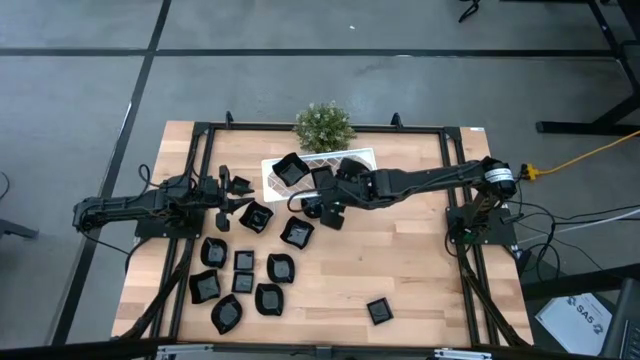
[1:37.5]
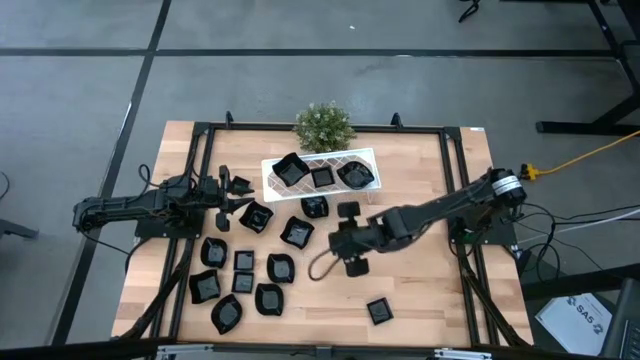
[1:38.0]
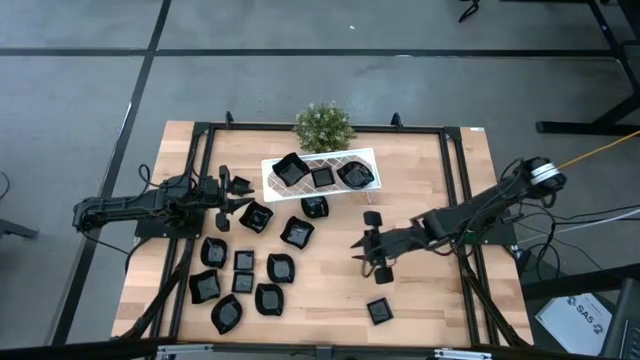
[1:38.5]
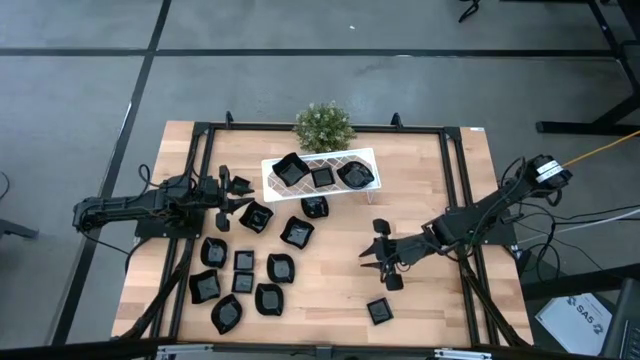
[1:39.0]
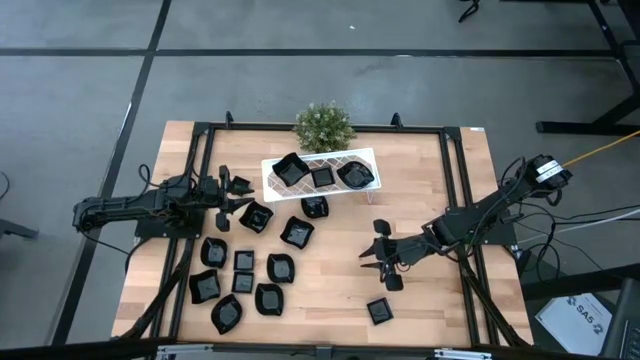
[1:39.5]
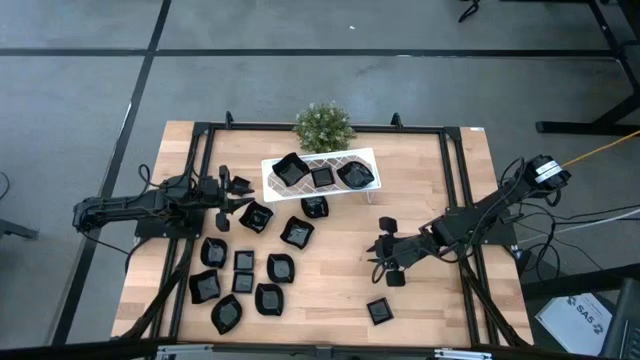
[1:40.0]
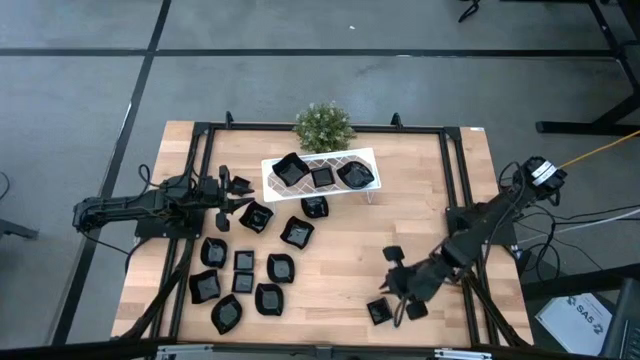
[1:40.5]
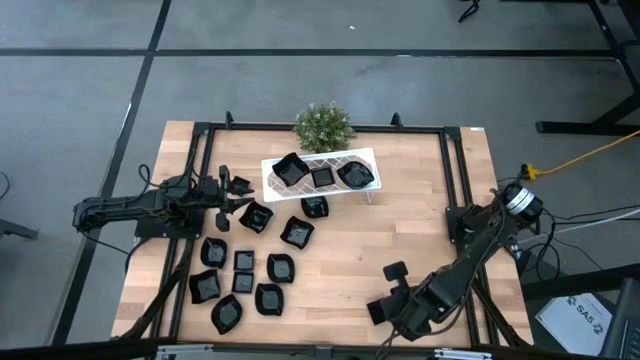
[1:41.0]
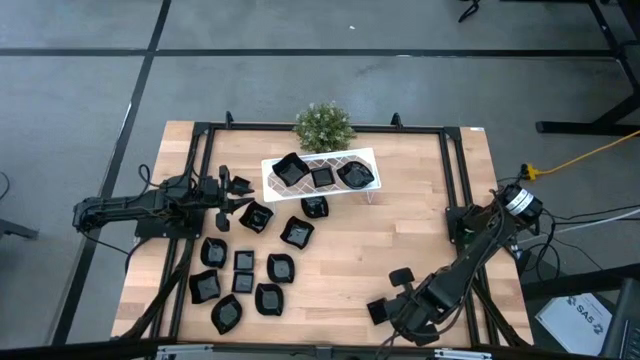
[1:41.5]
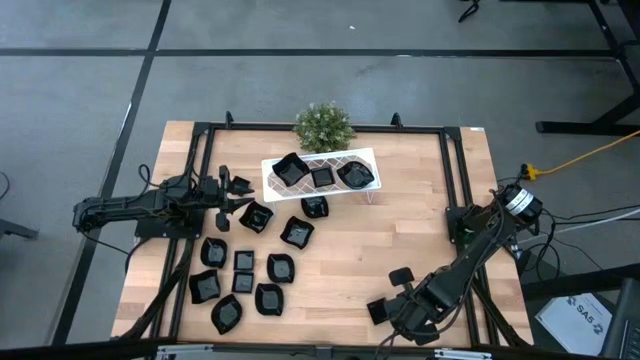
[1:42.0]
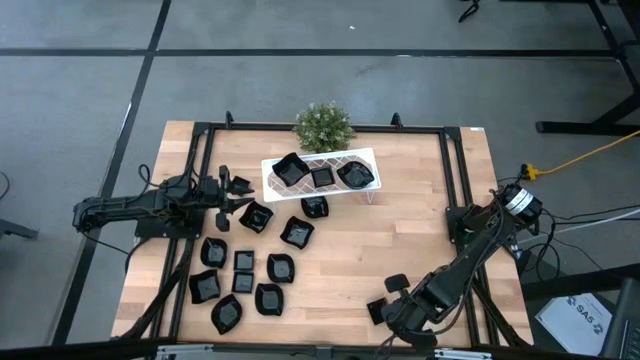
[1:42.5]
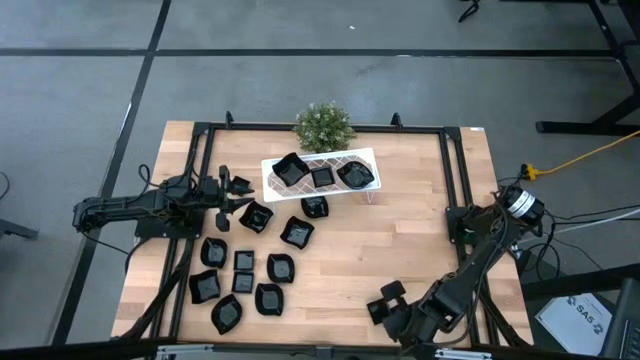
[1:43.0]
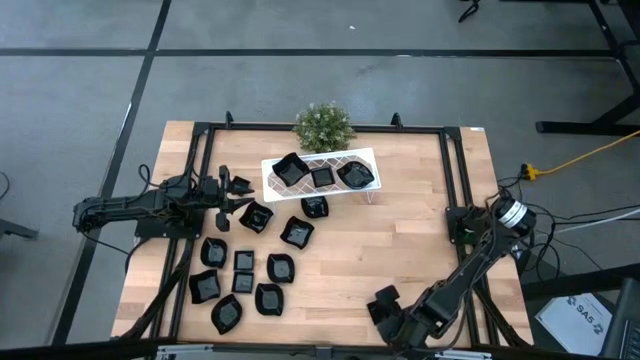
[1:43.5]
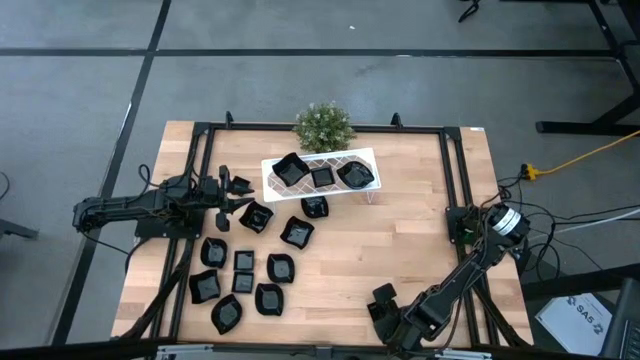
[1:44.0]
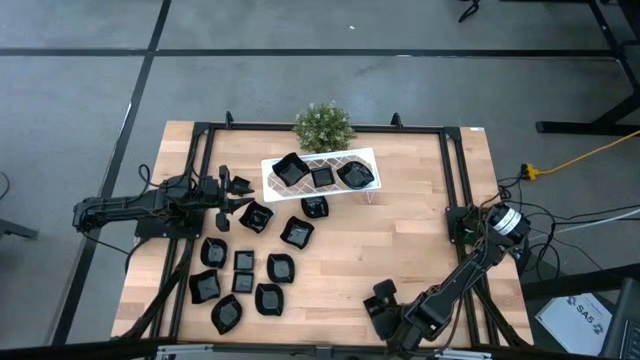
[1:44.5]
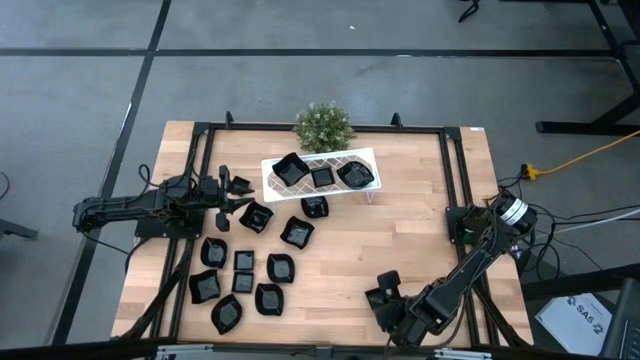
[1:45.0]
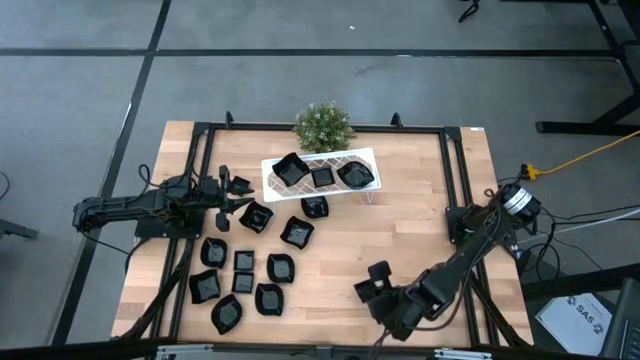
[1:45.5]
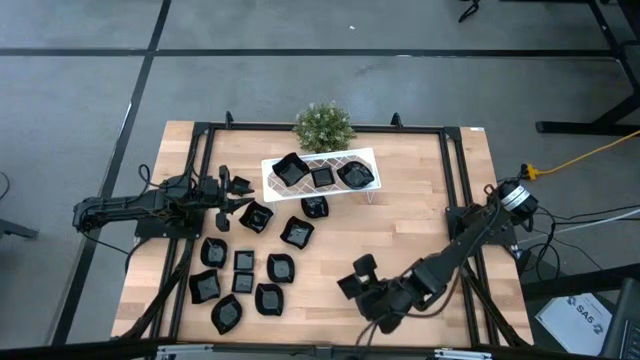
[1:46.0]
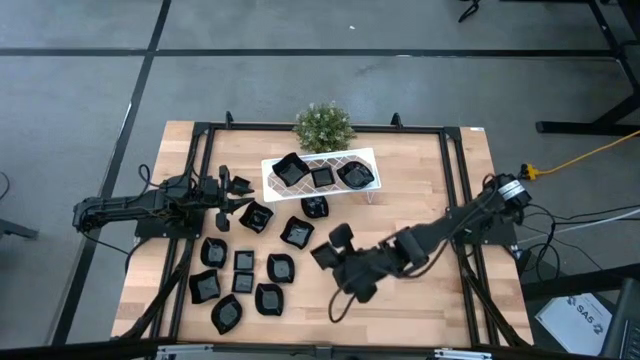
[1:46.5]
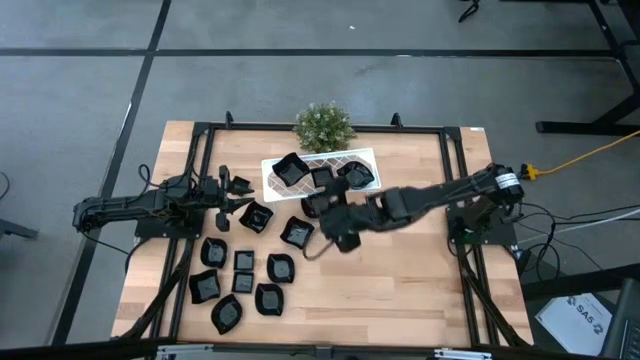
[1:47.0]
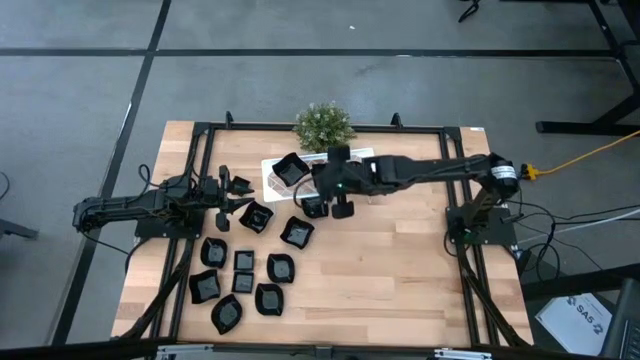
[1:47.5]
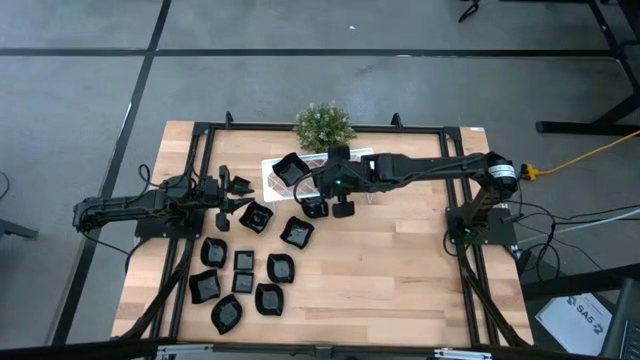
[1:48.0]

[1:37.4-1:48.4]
Task: Pick & Place Mini shaped plates
Stack the square plate on top of the square plate on the shelf

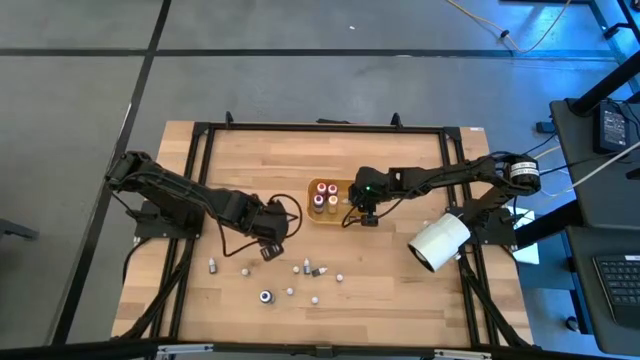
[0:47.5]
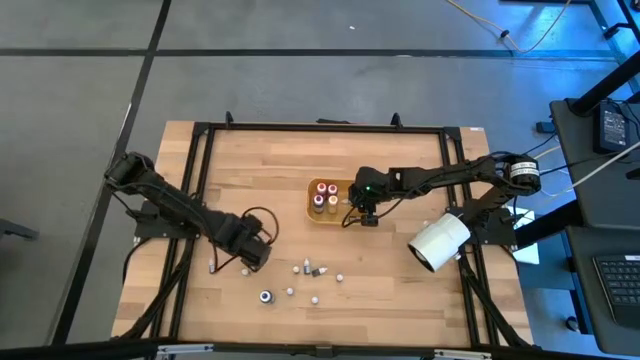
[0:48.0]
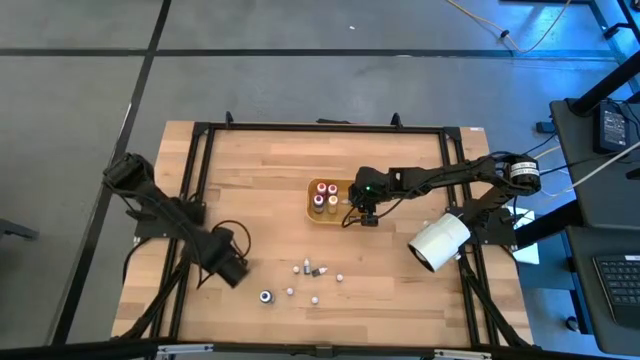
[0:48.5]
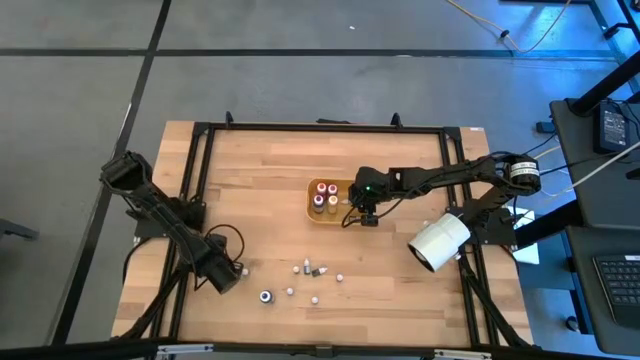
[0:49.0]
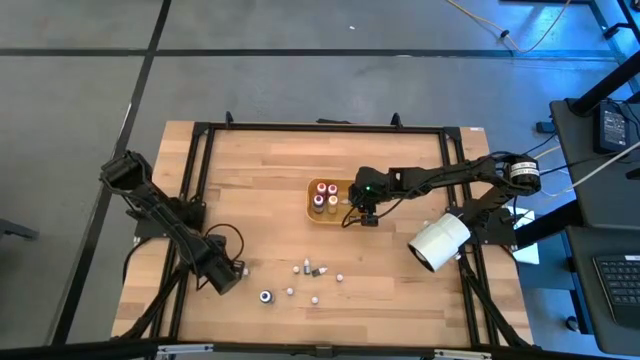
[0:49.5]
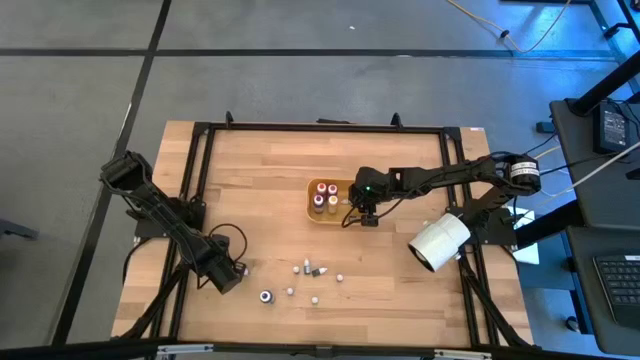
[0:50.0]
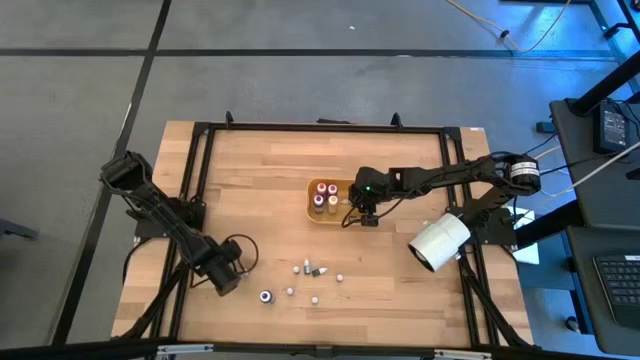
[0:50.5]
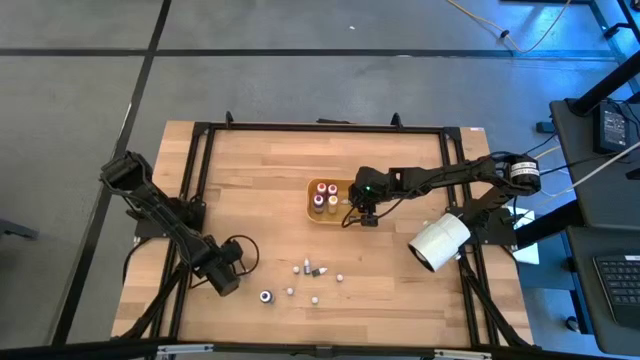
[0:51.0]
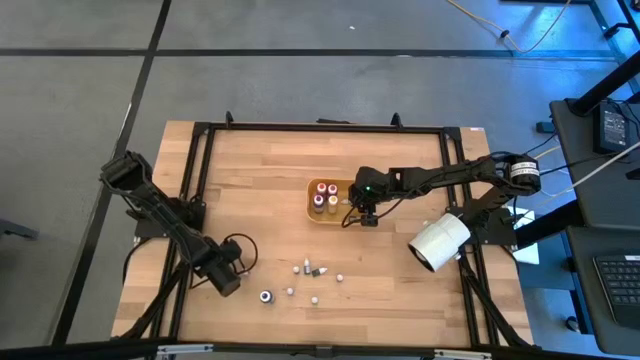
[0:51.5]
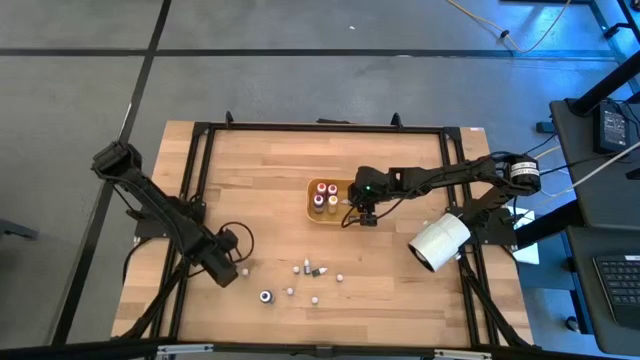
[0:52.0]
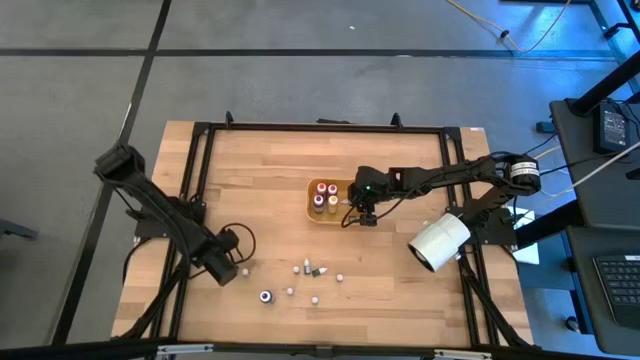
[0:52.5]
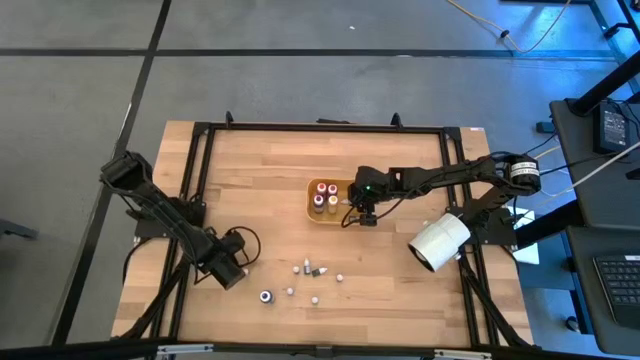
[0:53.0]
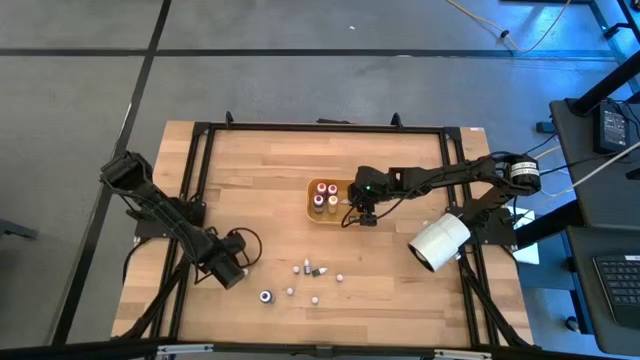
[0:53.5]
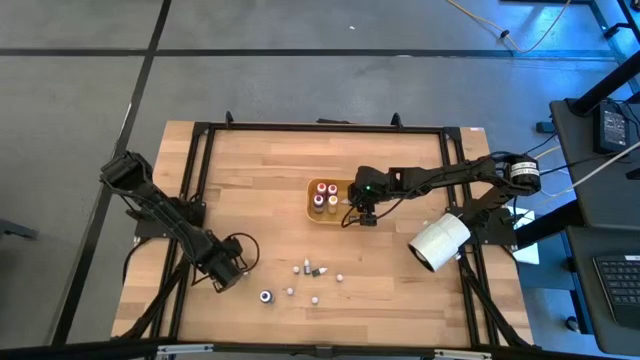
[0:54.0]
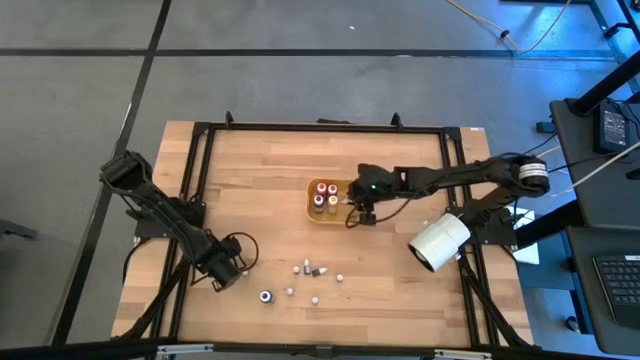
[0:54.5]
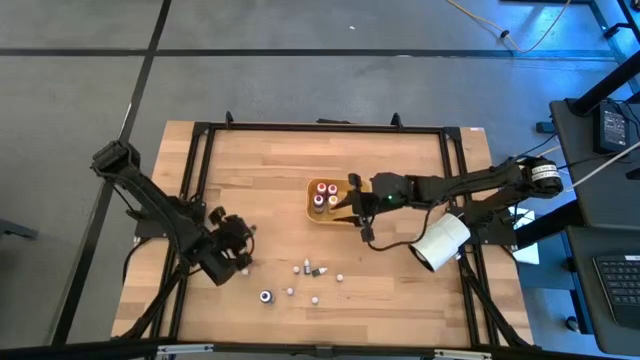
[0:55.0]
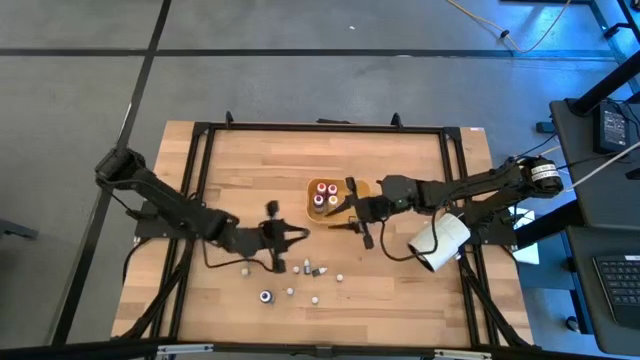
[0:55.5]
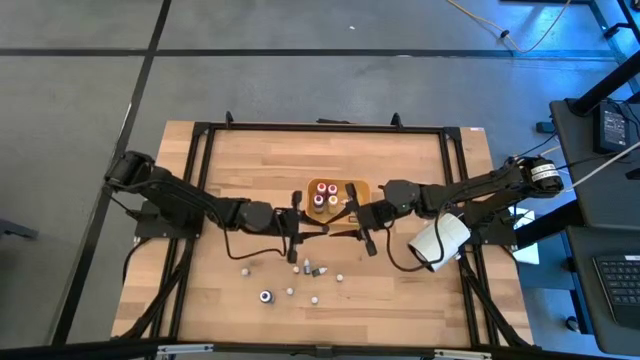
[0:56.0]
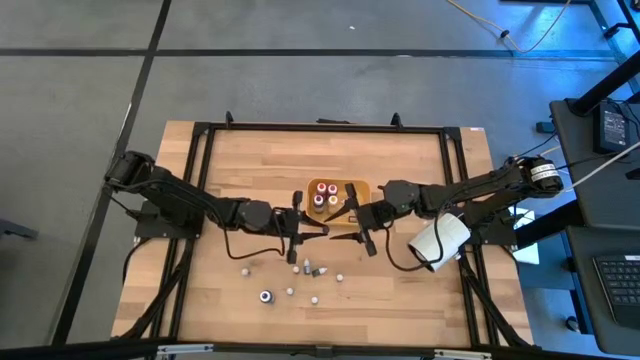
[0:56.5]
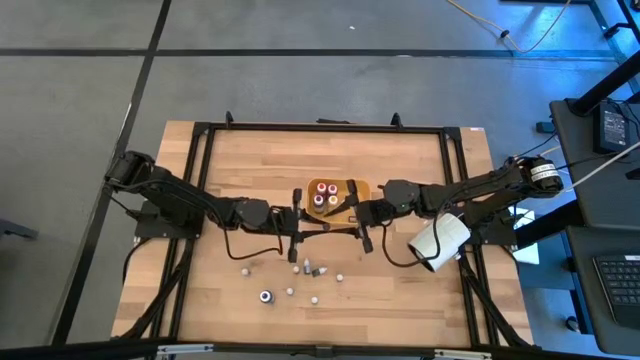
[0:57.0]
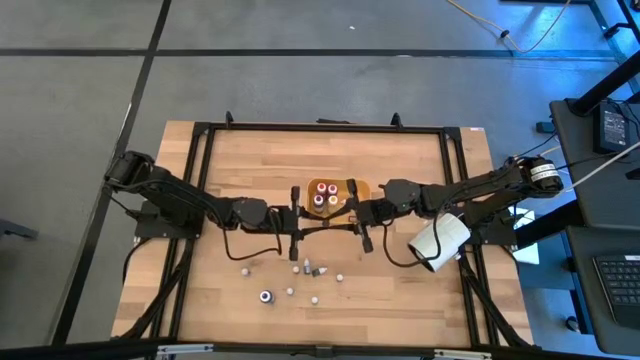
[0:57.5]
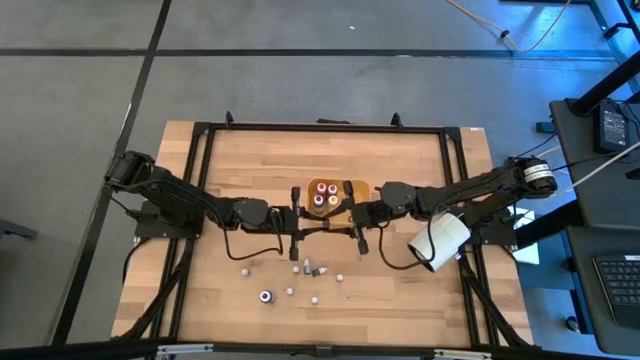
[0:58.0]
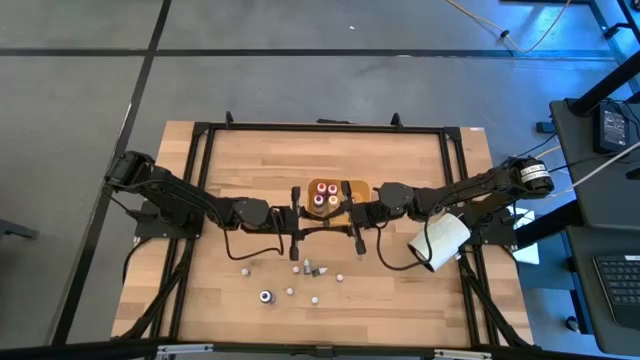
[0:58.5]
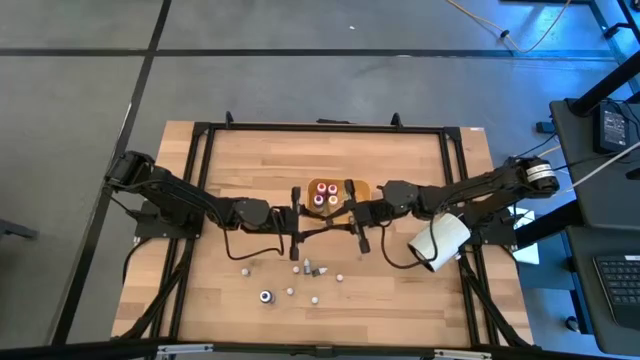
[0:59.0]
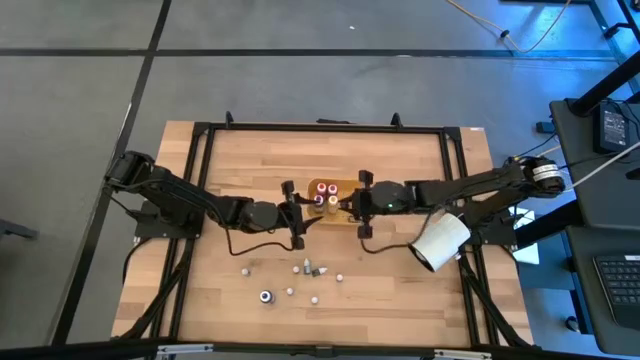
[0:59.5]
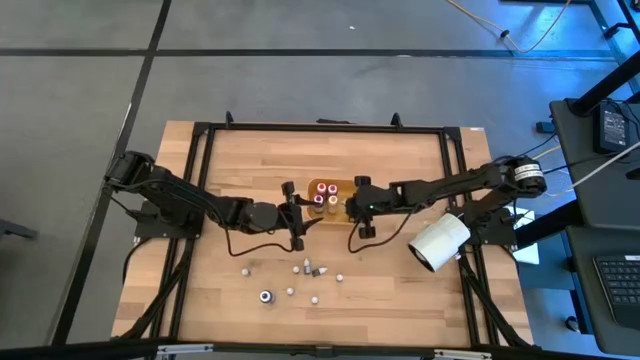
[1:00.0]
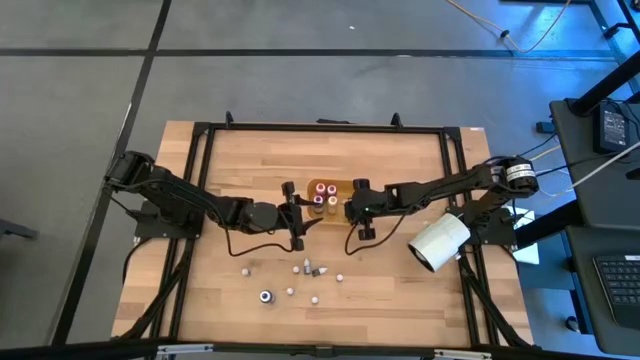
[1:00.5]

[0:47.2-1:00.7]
Task: Pick & Place food coloring
Put the small red food coloring bottle into the yellow bin
